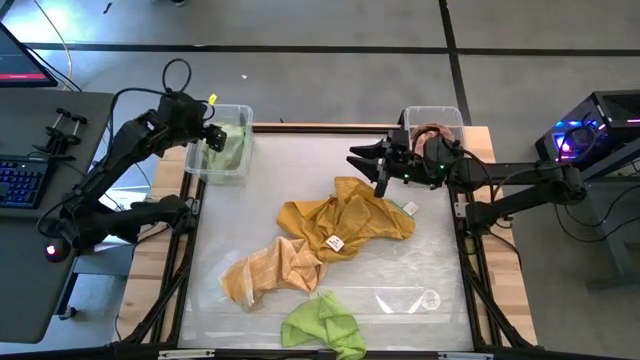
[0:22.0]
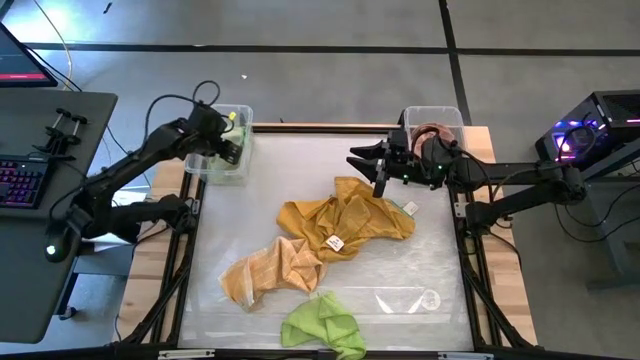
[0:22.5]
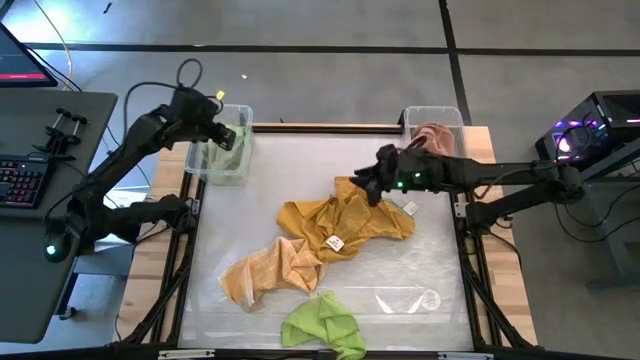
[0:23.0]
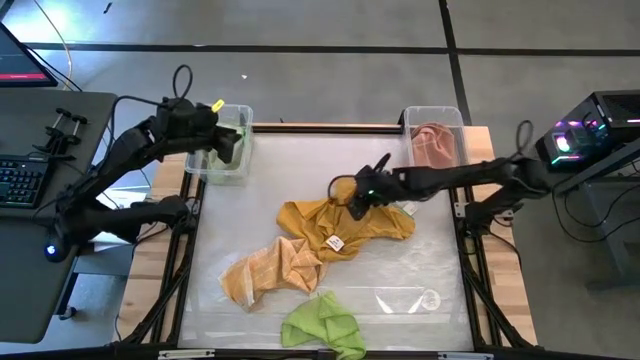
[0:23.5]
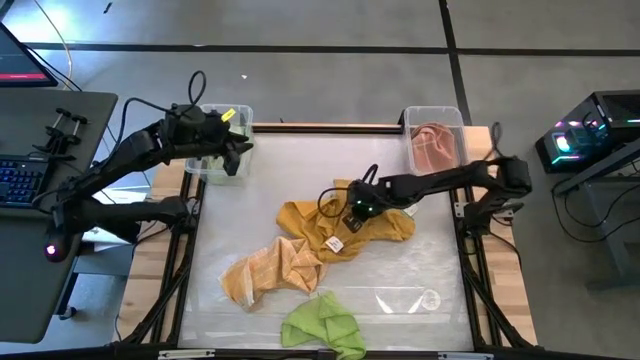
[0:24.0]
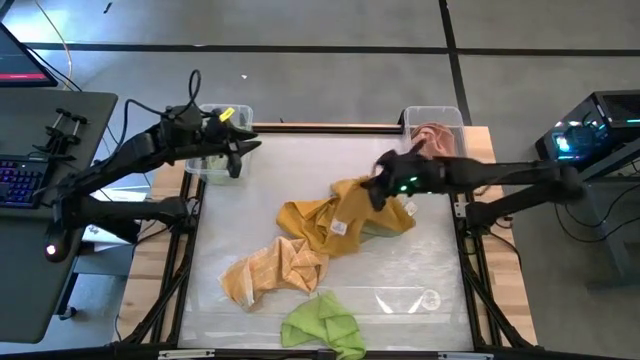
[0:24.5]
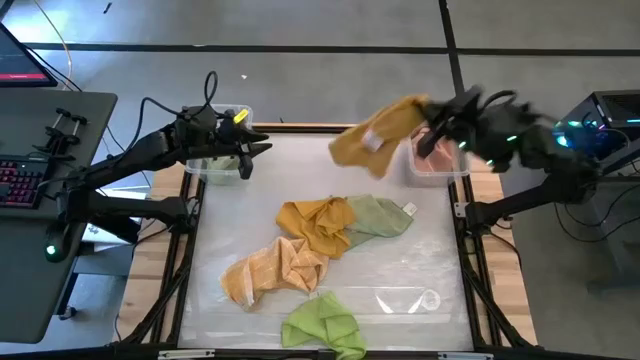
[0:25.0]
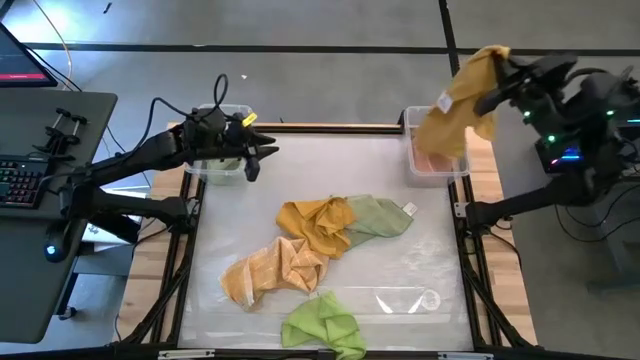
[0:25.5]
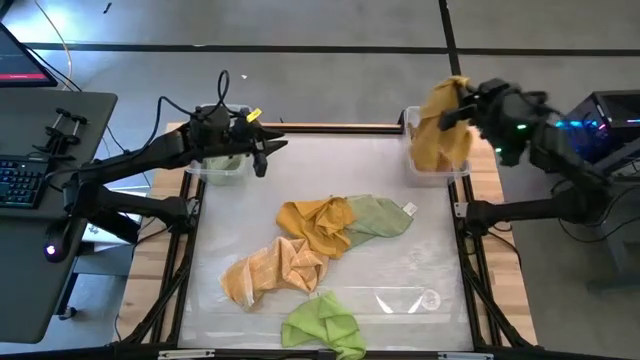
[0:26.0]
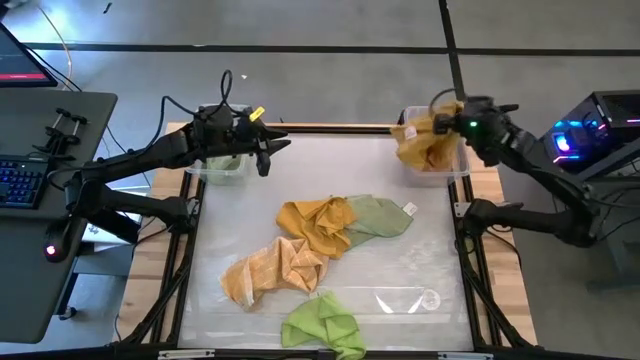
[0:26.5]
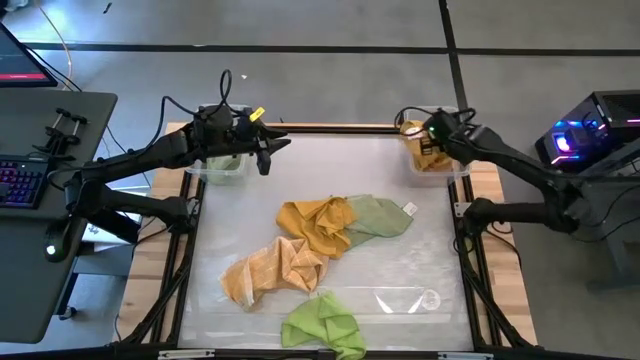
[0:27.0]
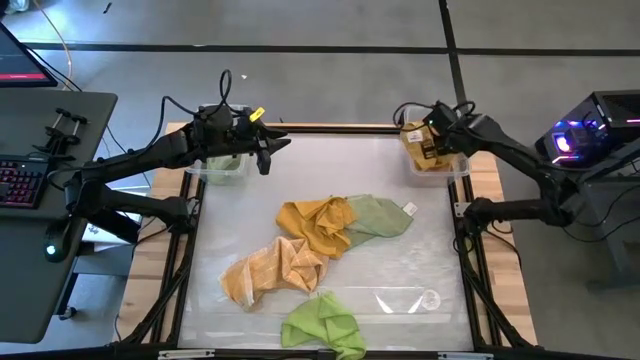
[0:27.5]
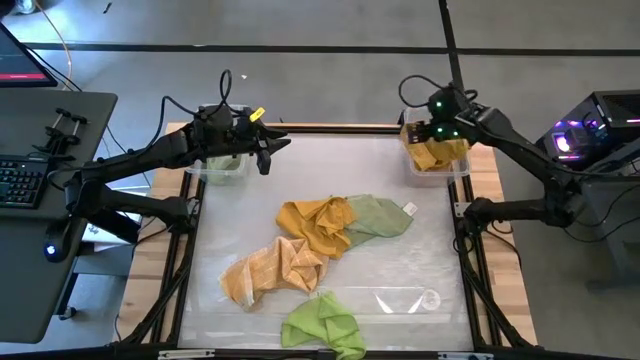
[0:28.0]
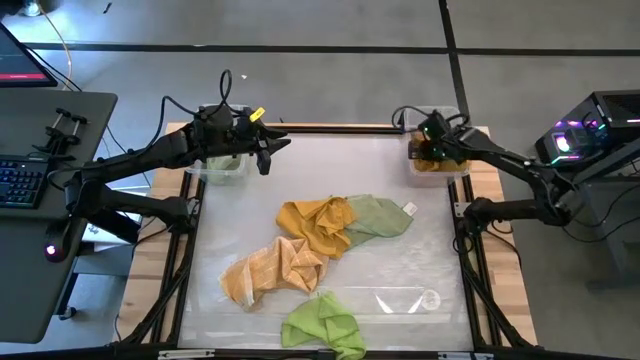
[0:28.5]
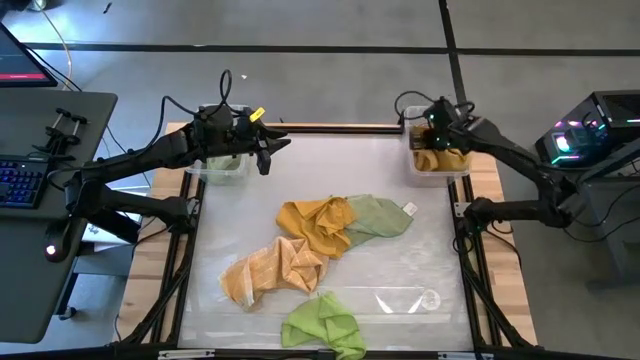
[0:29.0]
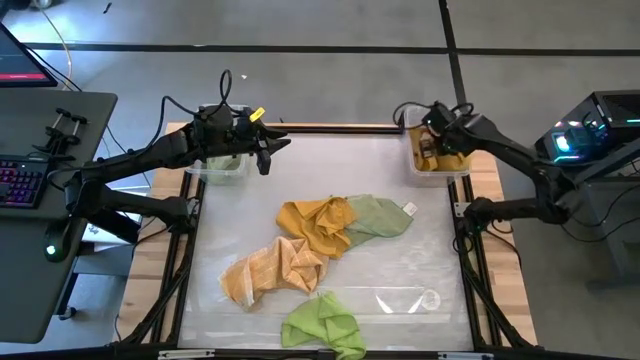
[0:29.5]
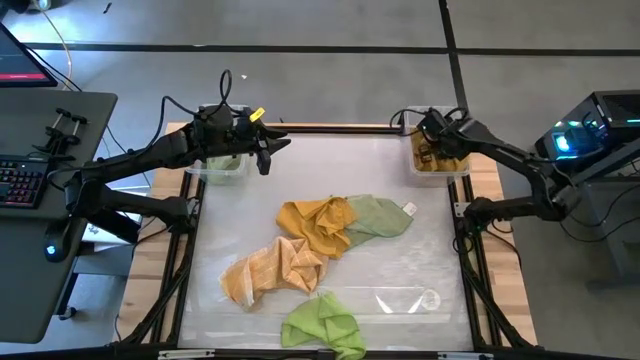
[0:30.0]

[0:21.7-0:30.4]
Task: Sort towels by color in basket
Put the yellow kitchen towel into the right transparent bin

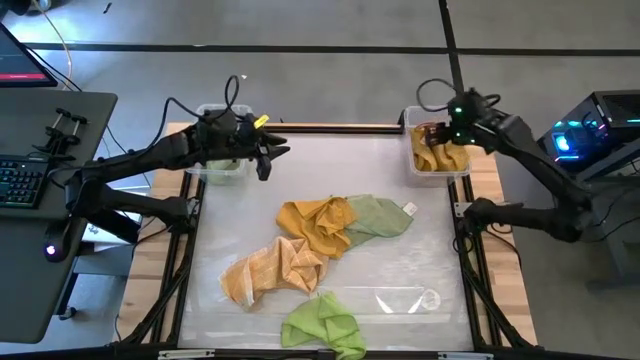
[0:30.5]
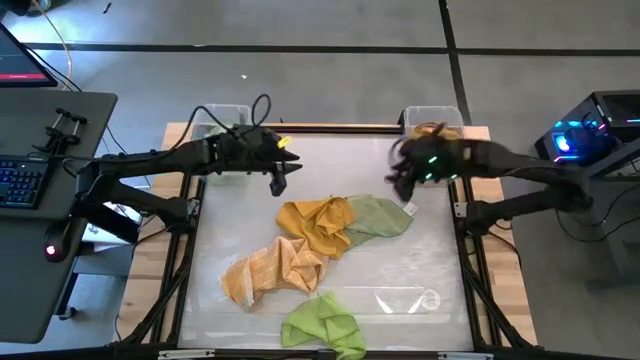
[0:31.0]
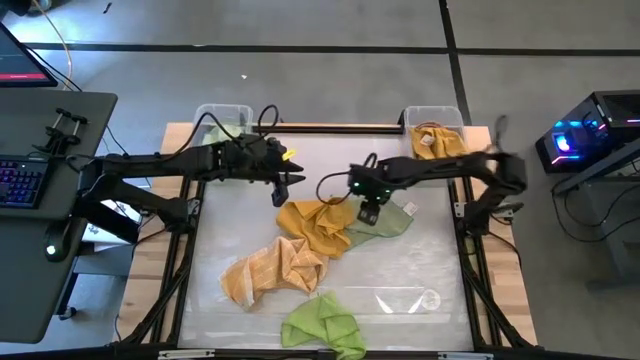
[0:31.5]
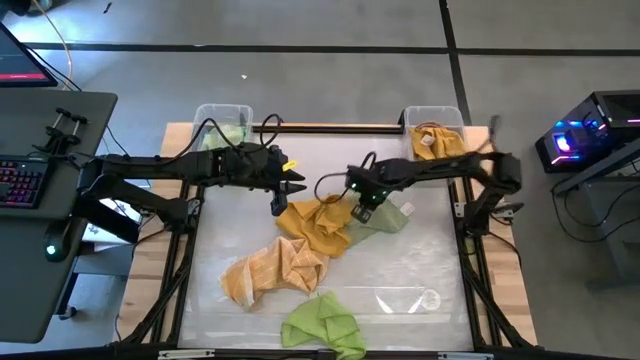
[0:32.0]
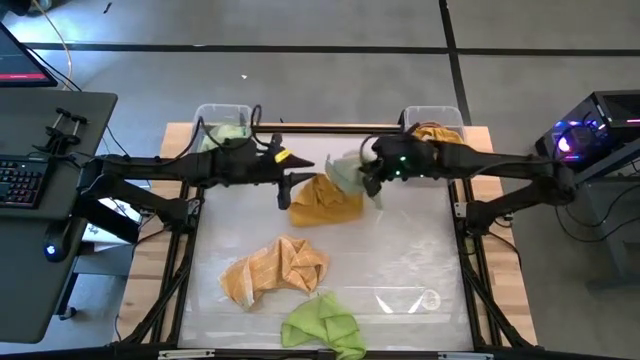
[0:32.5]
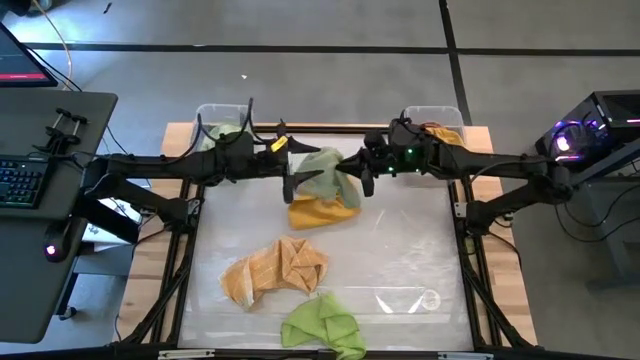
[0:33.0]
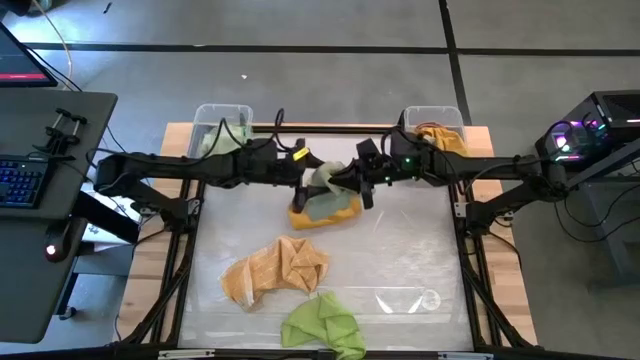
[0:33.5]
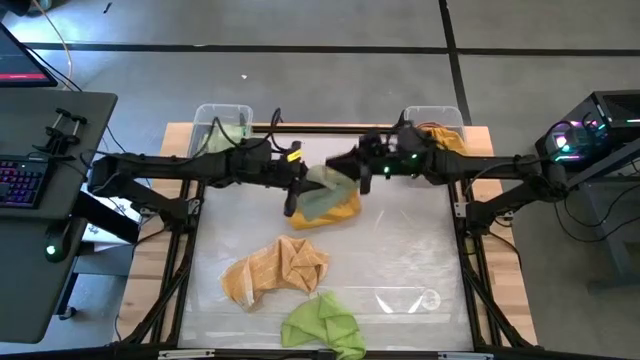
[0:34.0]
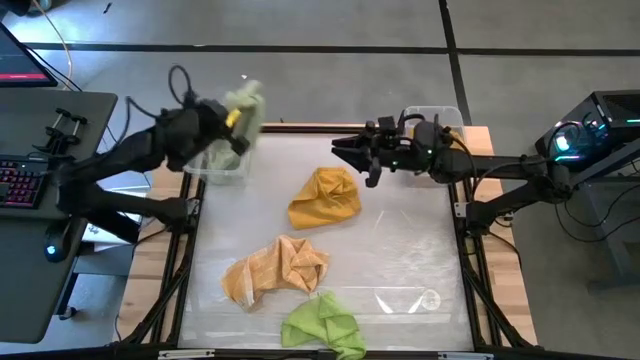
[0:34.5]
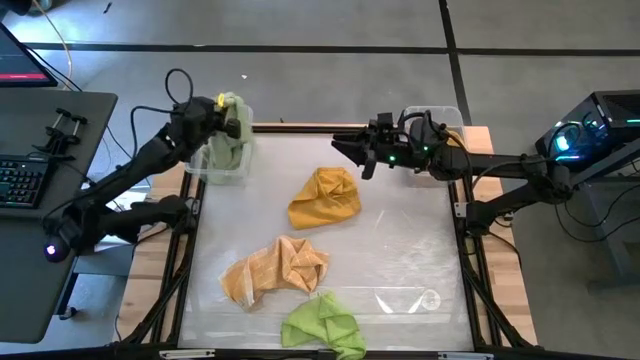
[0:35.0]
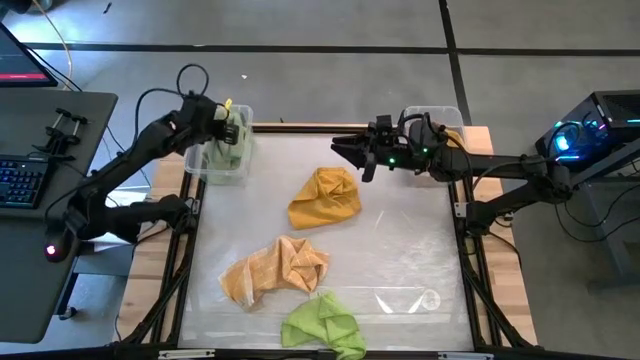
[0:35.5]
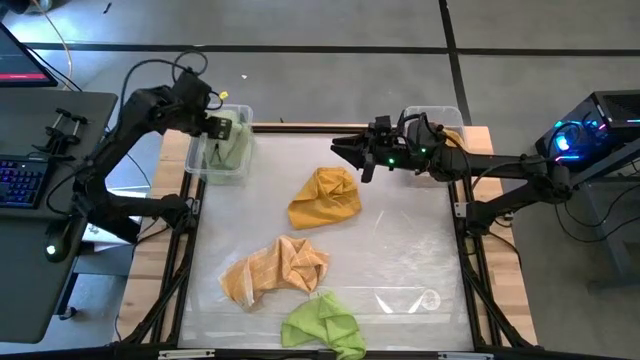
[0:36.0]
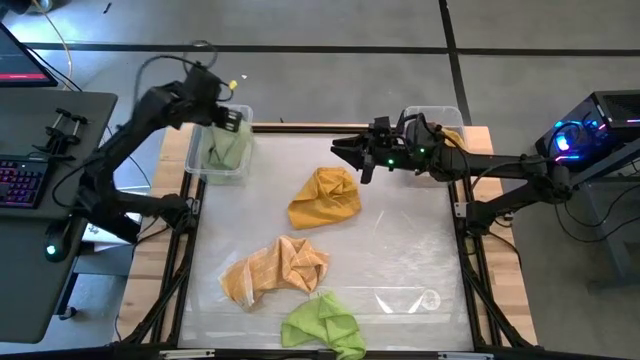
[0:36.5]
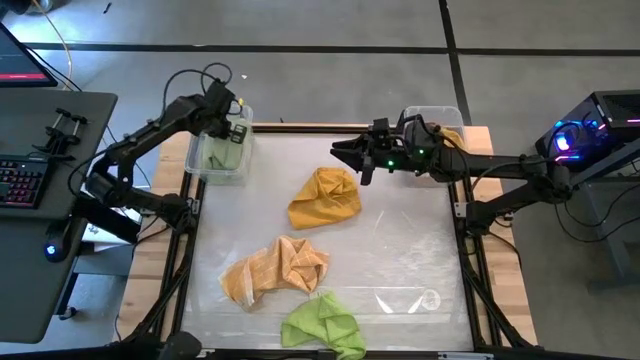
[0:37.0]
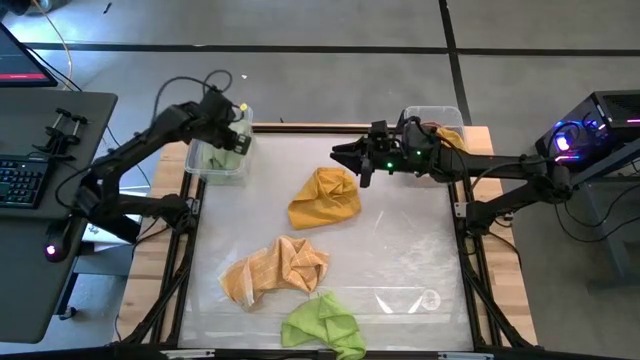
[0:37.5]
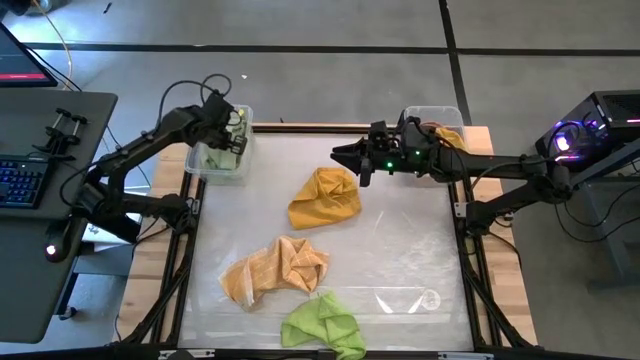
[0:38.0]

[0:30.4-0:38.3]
Put the green microfiber towel into the left transparent bin

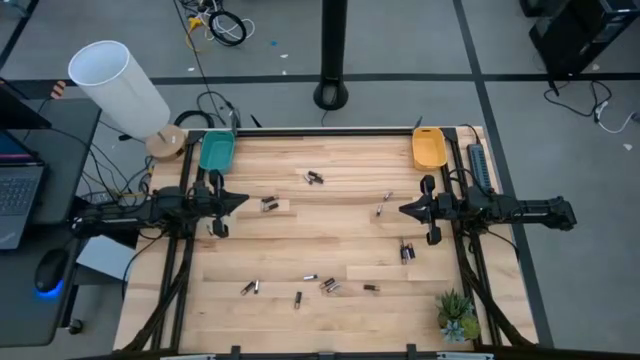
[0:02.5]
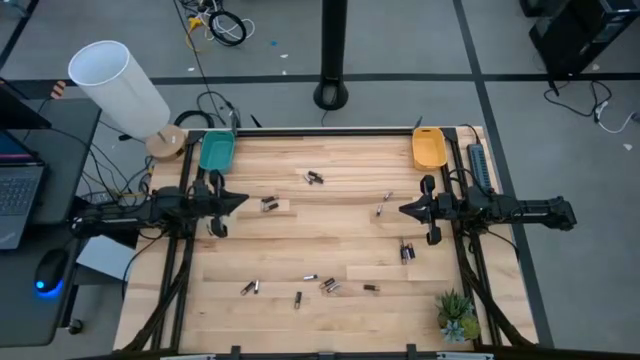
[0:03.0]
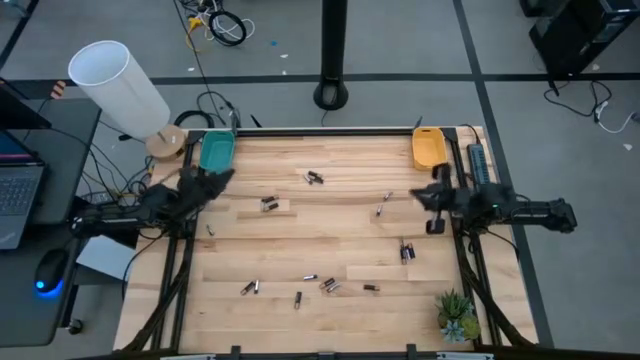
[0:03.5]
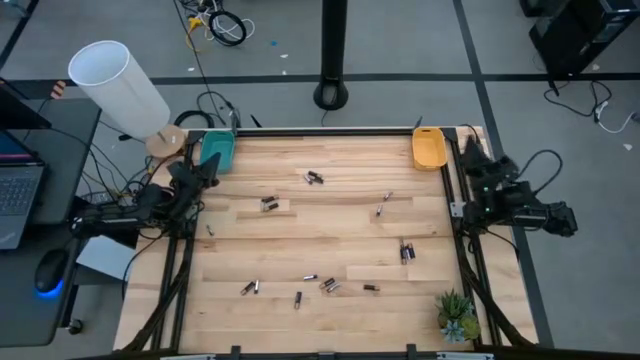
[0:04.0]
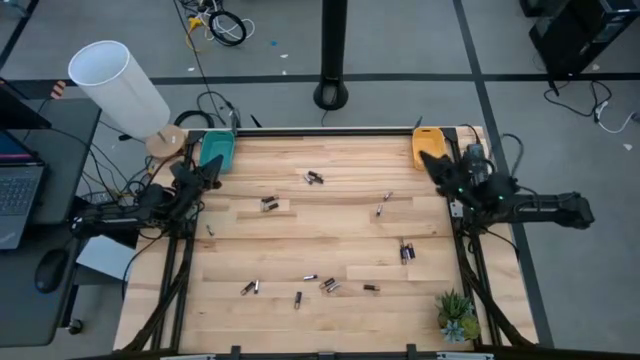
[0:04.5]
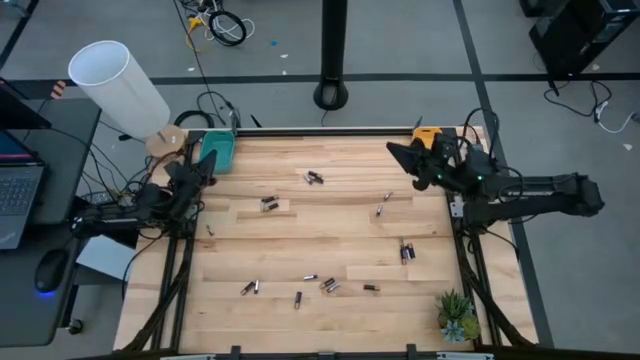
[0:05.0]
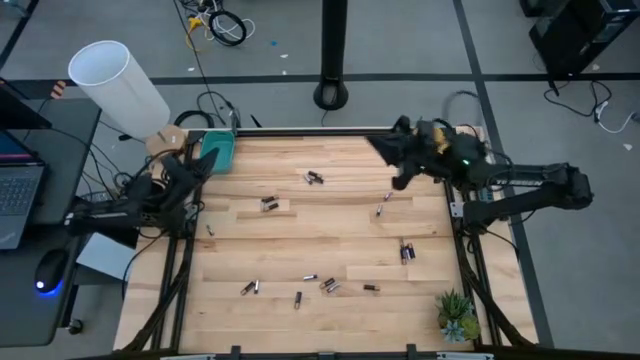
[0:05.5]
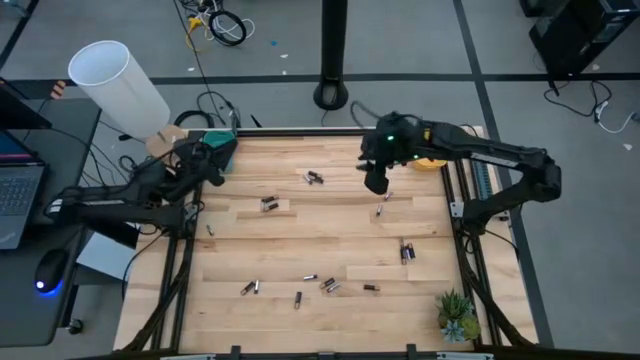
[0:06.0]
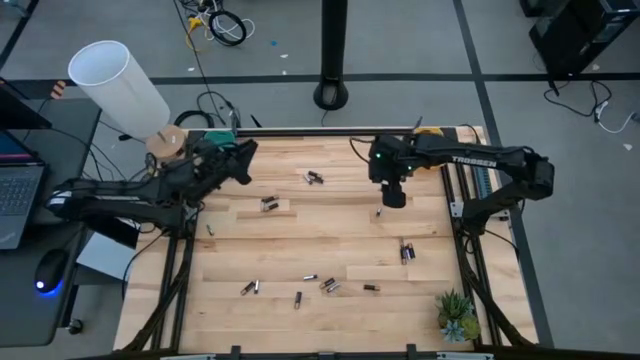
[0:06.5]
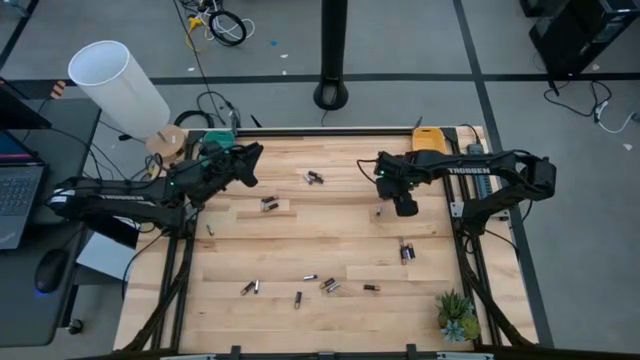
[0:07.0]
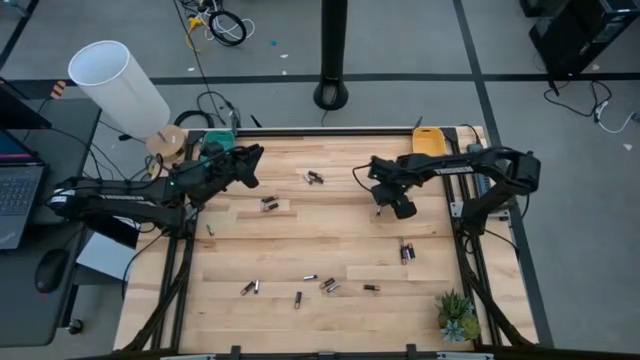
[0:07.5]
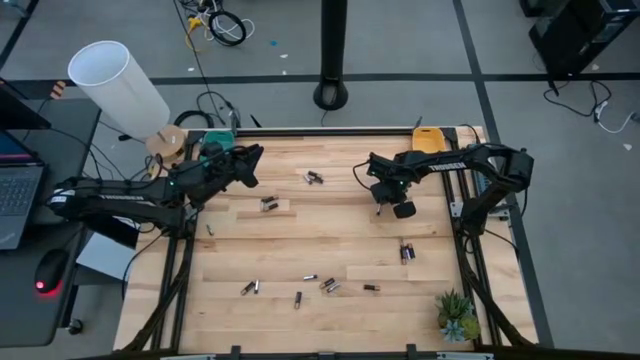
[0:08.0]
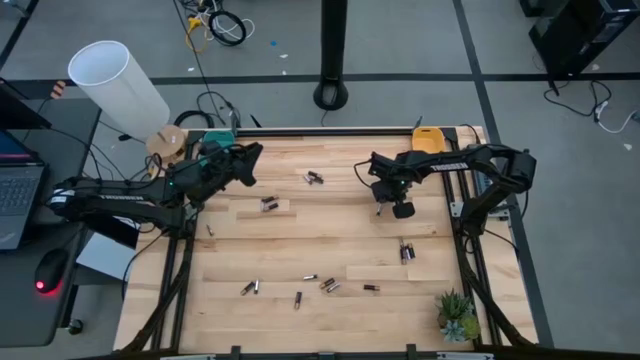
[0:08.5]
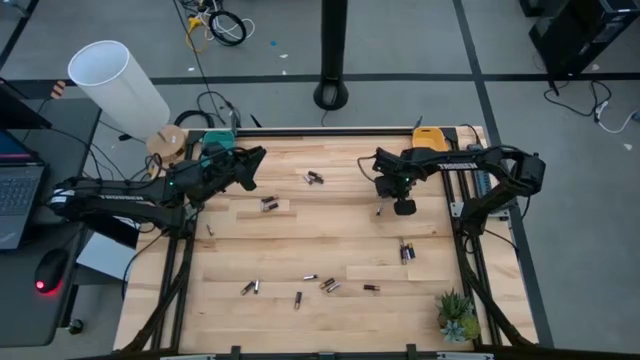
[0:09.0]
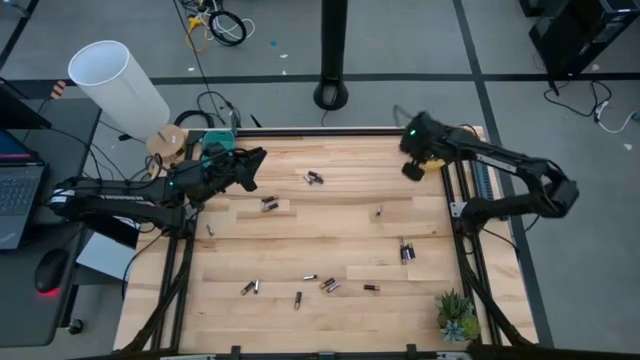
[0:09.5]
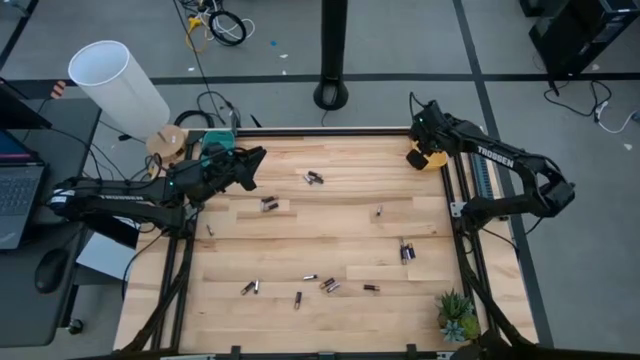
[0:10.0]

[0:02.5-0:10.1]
Task: Sort batteries
Put the silver battery into the yellow bin
